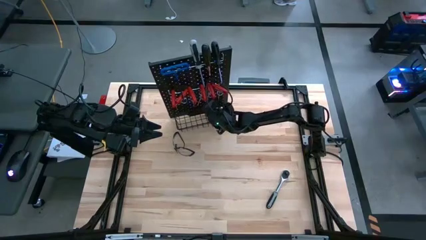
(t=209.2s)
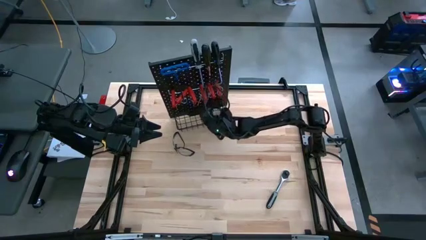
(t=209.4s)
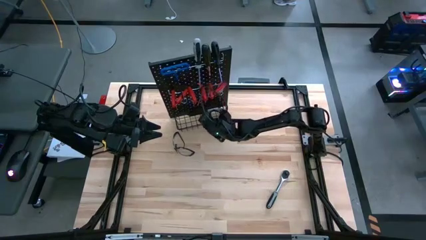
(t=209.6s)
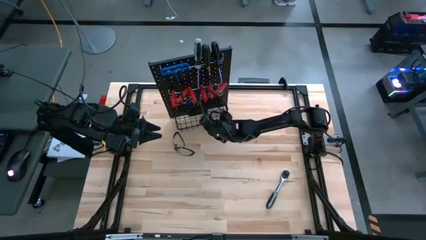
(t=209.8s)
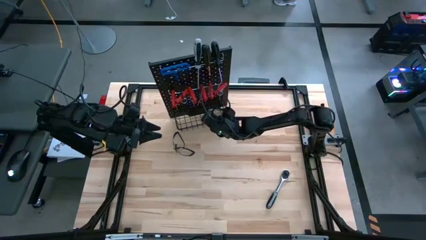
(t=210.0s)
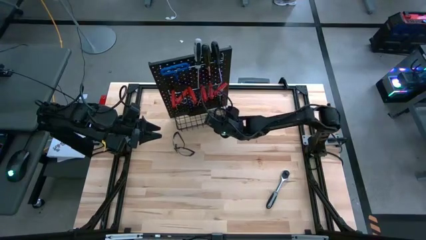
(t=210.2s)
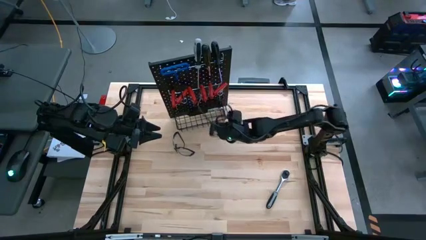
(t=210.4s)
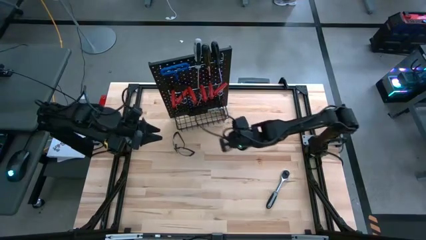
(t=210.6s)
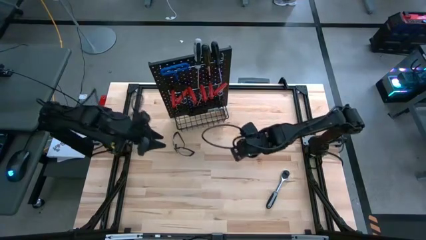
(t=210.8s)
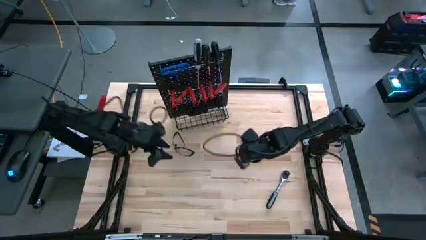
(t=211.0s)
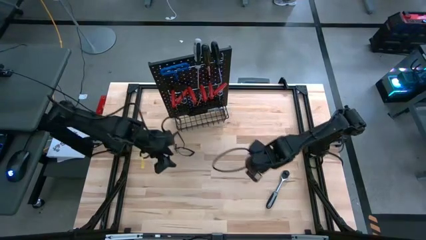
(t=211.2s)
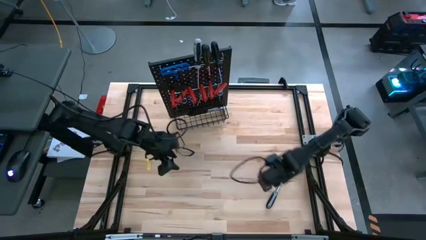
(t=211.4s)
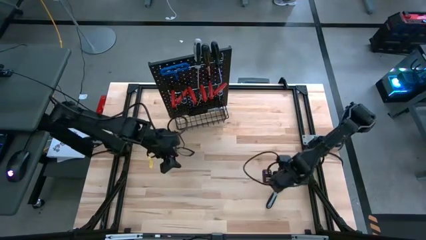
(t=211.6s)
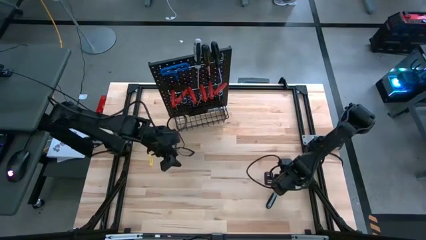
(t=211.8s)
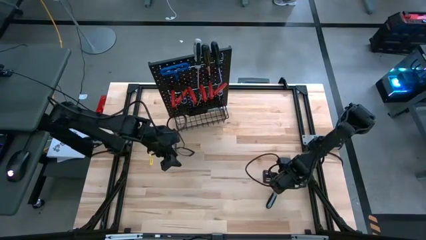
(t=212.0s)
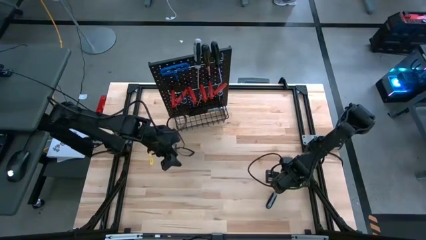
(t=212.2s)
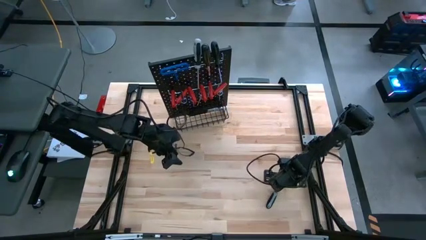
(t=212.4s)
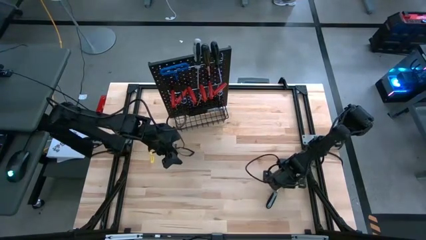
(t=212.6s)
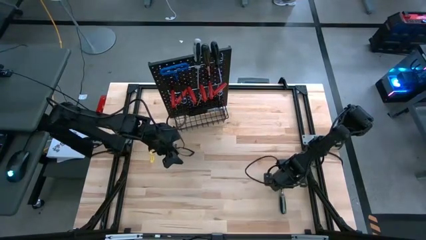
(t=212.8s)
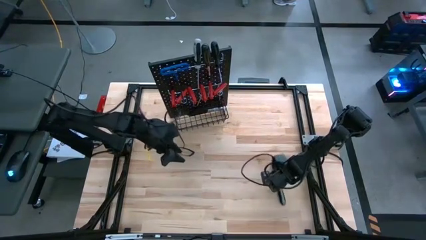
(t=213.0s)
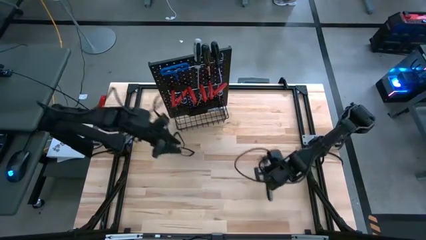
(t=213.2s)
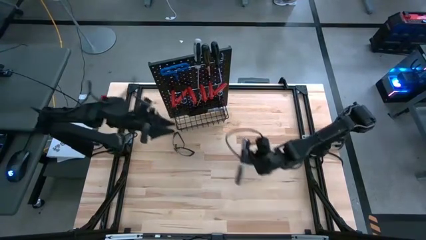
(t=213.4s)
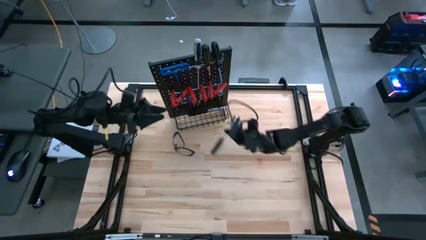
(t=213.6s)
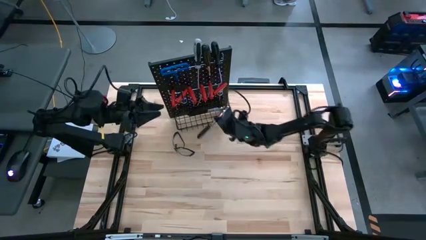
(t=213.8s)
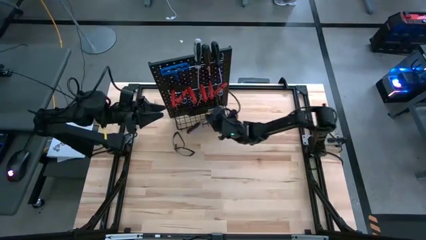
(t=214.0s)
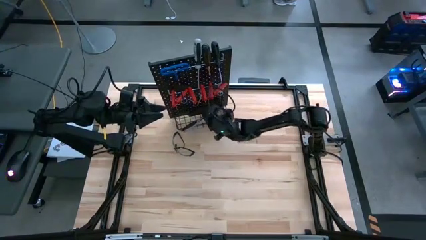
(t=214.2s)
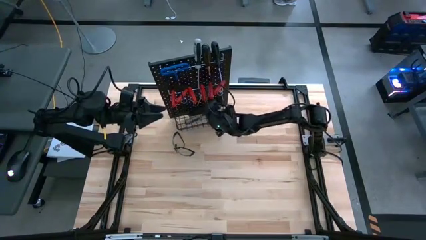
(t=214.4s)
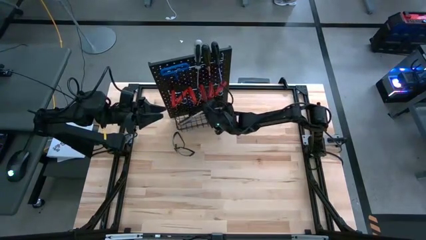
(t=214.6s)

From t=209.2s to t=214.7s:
Task: Hang tools onto peg board
Put the black ratchet socket wrench in the wire basket on the peg board

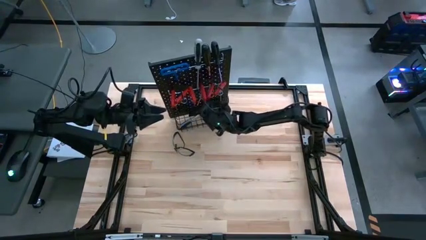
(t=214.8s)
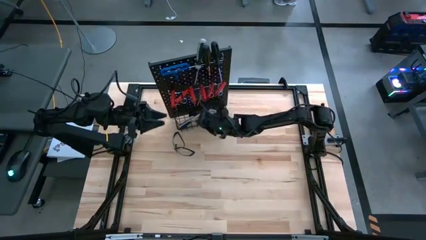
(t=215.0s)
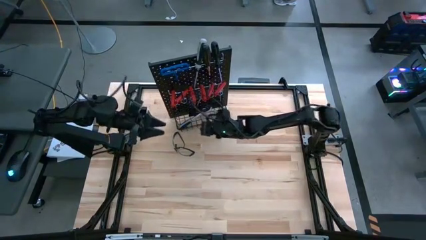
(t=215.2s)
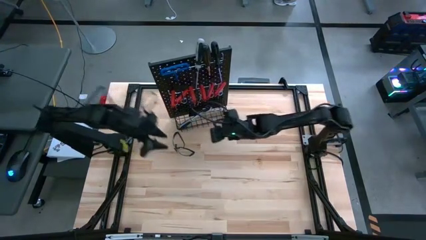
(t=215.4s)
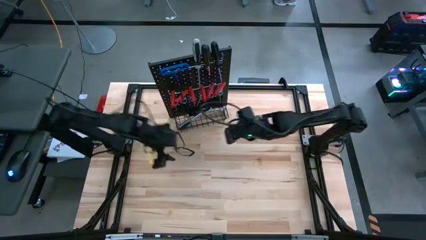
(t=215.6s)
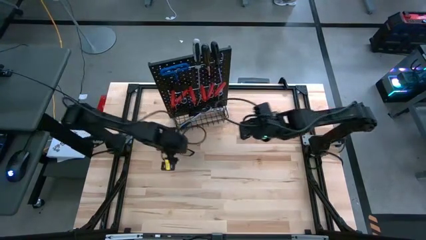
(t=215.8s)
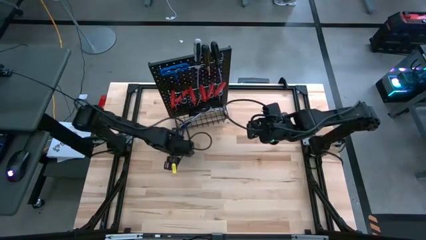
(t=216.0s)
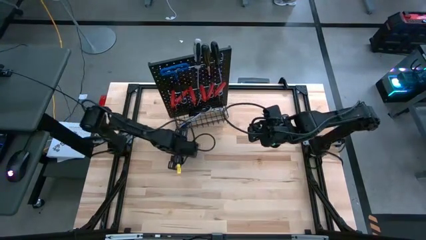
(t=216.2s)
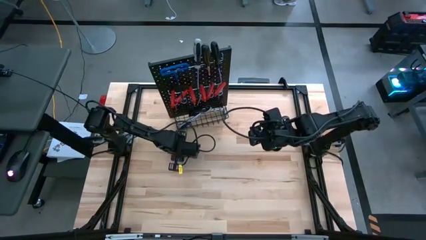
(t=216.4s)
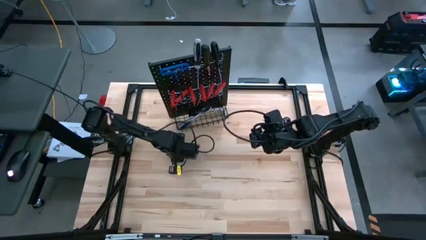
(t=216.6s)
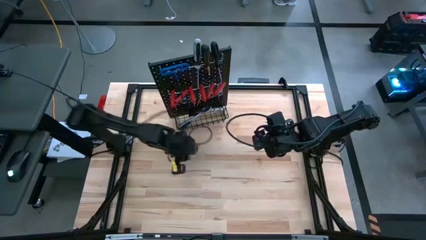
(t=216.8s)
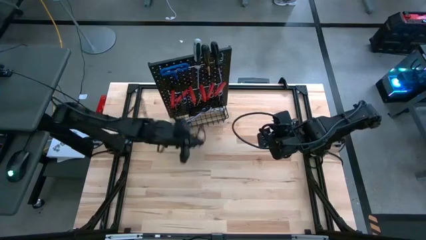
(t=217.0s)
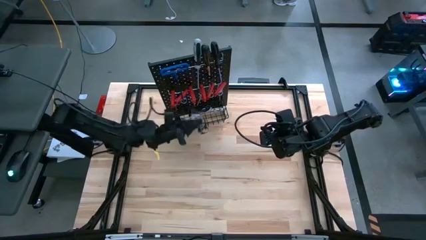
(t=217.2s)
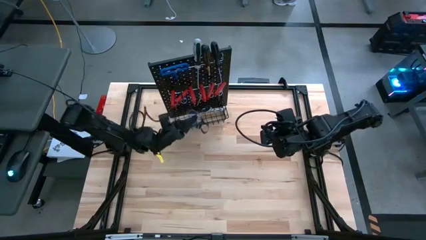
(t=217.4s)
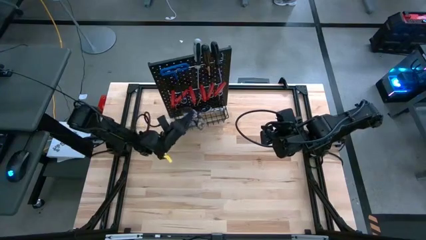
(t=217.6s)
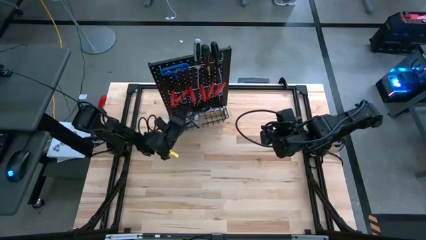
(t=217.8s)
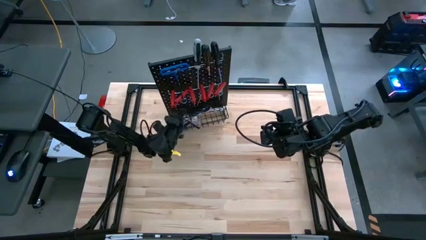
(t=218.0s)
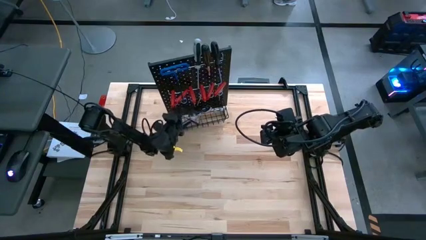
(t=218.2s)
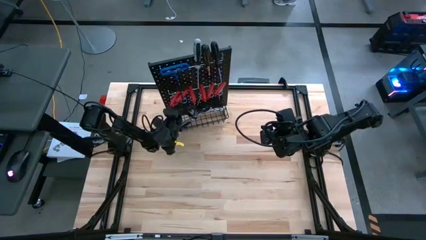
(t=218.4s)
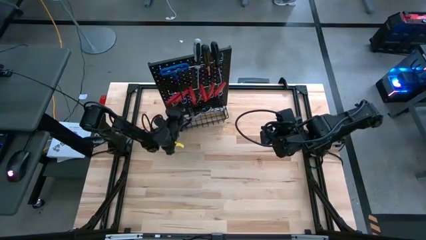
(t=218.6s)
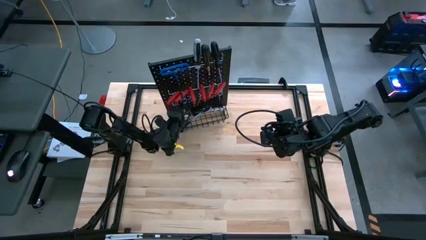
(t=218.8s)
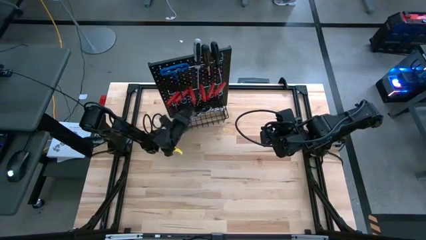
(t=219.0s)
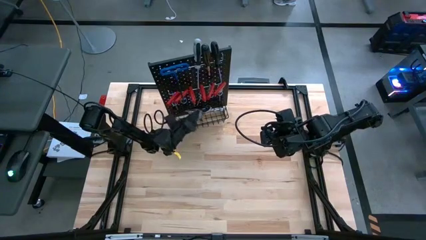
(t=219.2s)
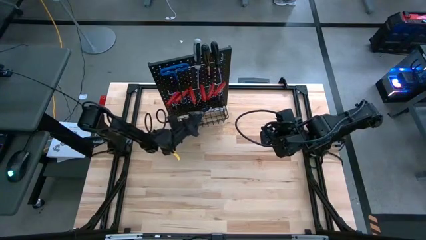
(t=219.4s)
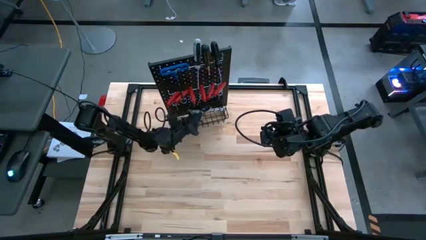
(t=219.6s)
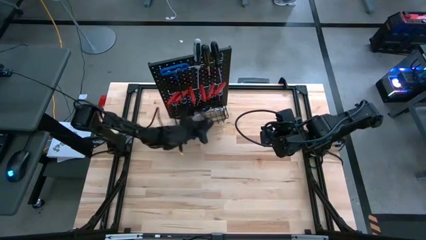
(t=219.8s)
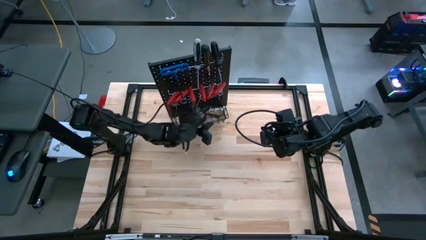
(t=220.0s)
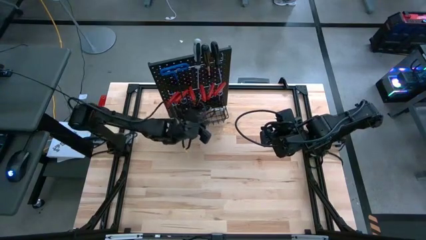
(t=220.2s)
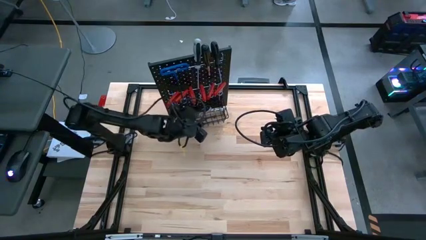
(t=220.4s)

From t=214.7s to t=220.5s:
Put the black safety goggle in the wire basket on the peg board

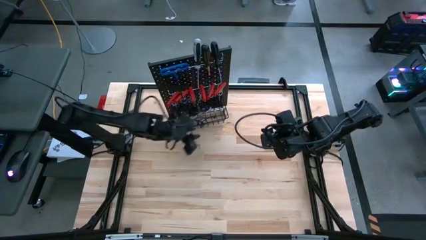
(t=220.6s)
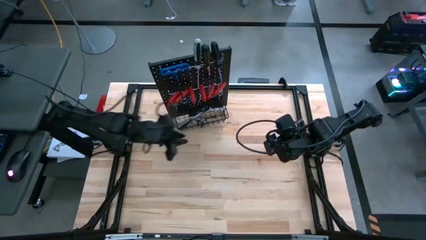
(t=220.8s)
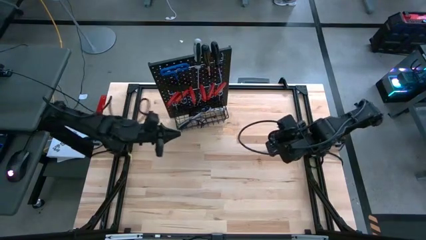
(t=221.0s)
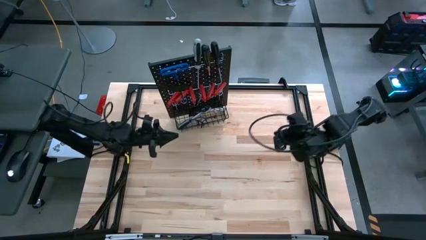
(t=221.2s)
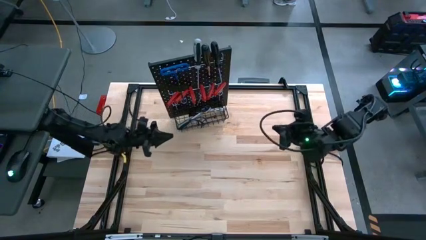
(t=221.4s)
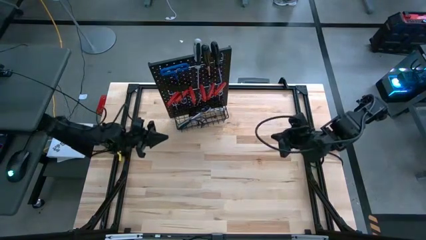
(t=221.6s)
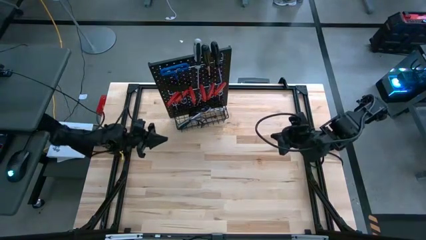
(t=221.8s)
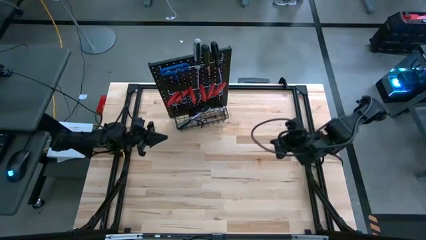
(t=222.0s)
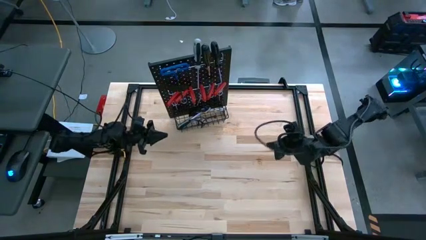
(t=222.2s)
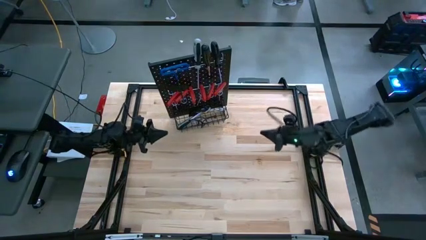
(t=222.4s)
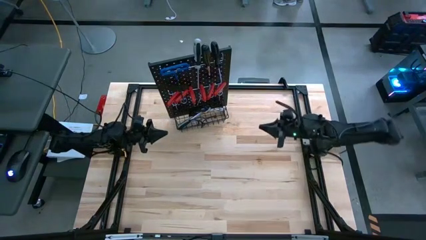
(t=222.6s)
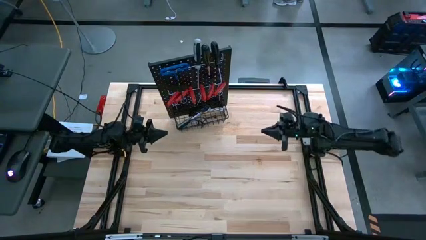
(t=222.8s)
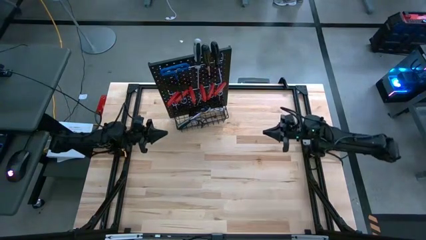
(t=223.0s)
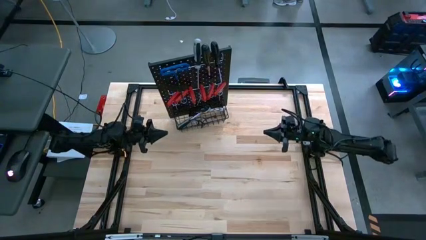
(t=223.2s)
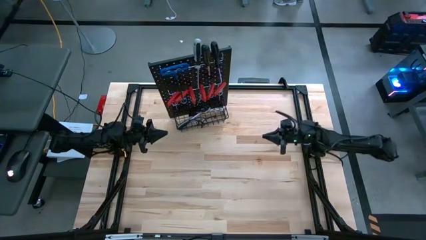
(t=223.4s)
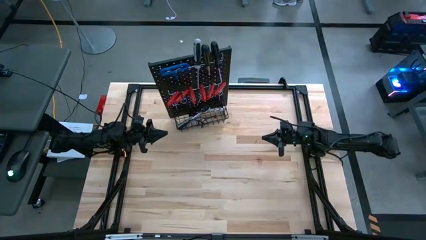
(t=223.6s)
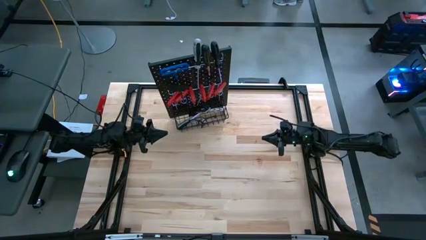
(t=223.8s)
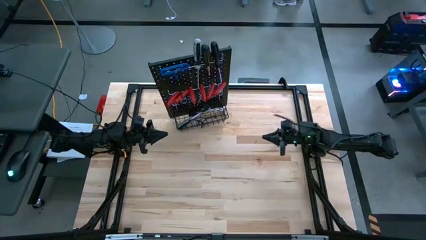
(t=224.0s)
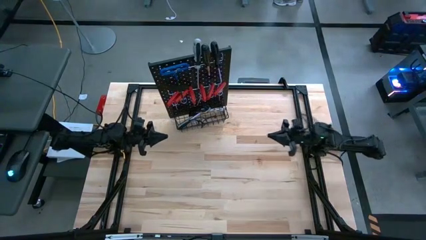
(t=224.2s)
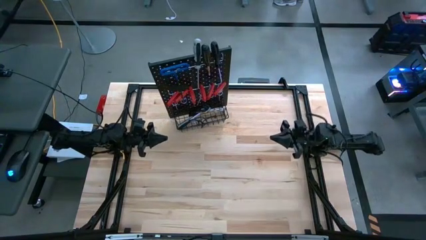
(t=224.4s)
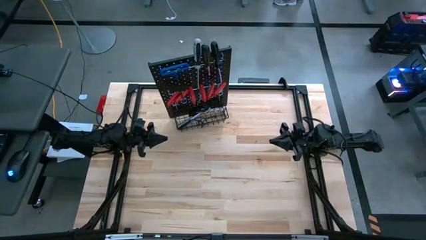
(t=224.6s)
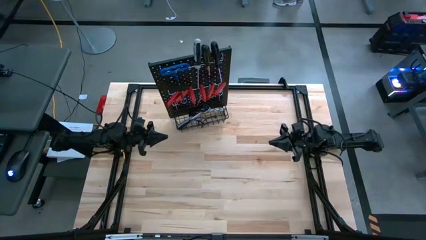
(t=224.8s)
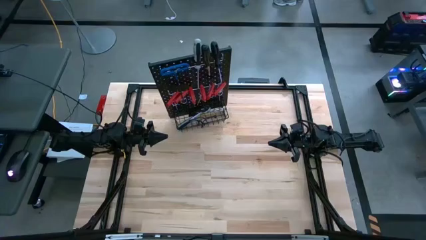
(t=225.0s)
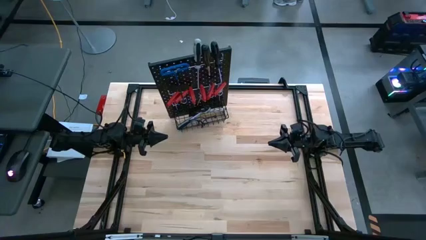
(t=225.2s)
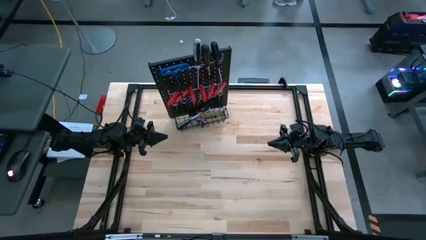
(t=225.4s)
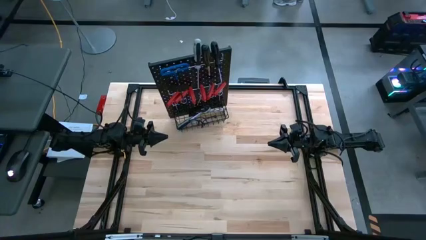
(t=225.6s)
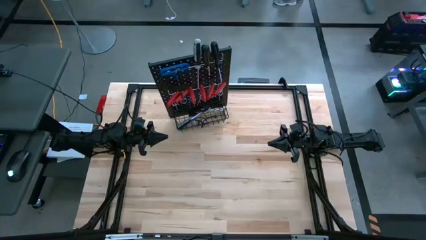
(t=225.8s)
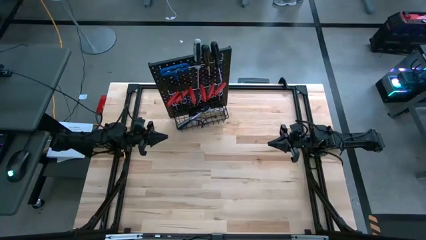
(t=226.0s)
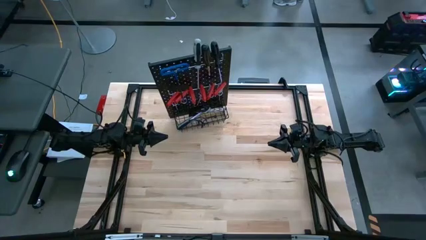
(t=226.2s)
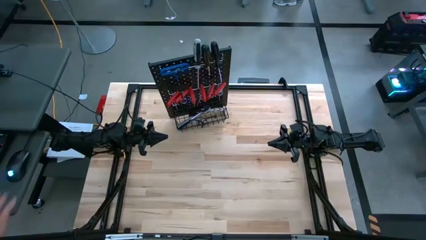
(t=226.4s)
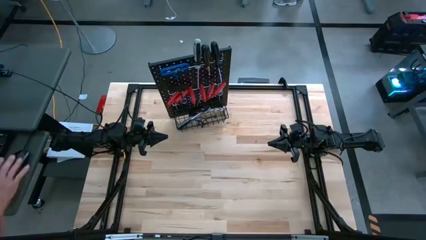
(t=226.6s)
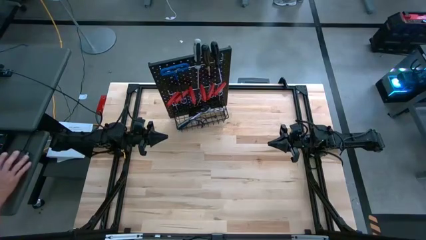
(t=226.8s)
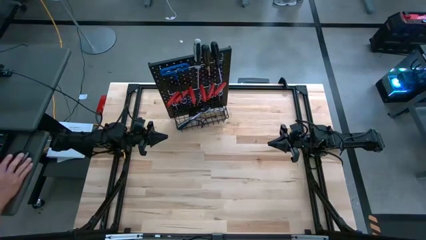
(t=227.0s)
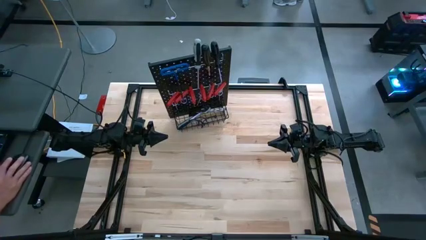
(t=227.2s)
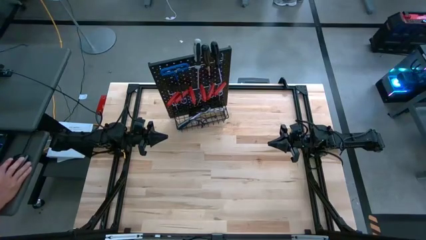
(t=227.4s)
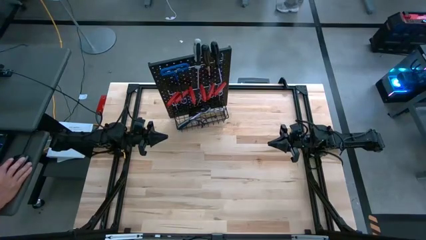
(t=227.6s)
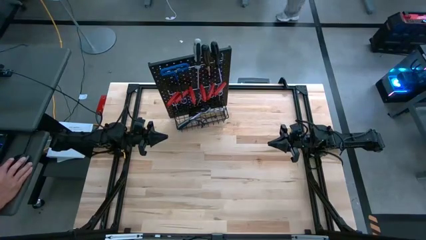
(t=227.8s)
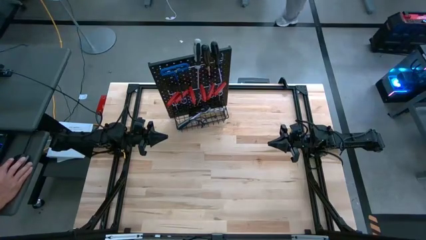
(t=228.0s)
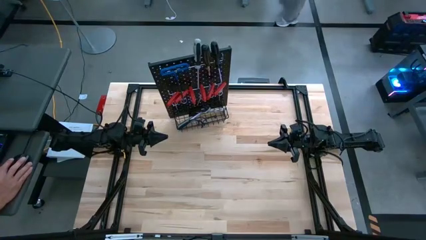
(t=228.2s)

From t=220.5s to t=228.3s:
Return to Home Position
